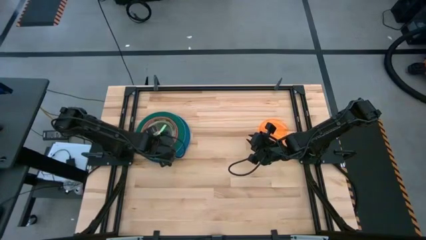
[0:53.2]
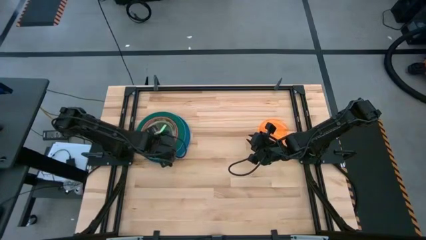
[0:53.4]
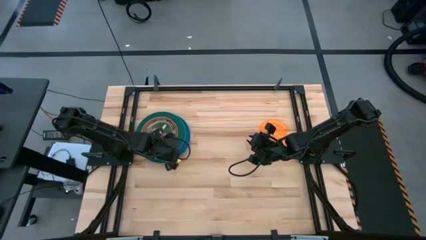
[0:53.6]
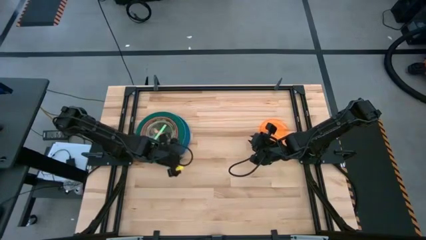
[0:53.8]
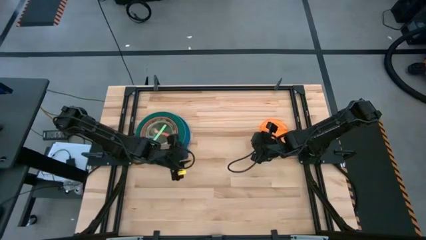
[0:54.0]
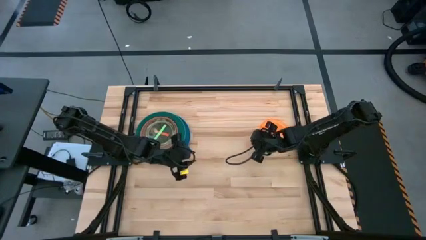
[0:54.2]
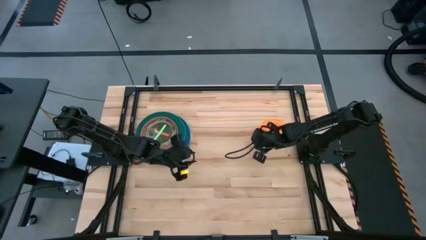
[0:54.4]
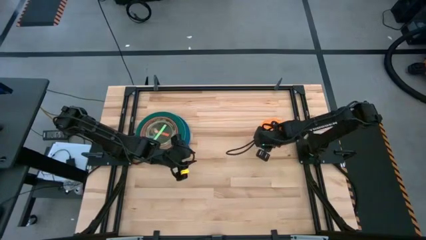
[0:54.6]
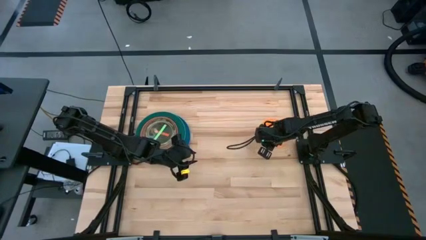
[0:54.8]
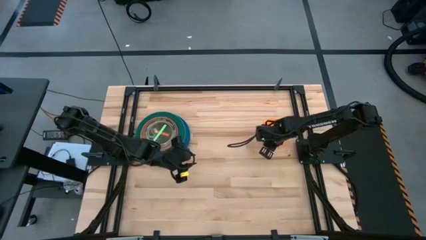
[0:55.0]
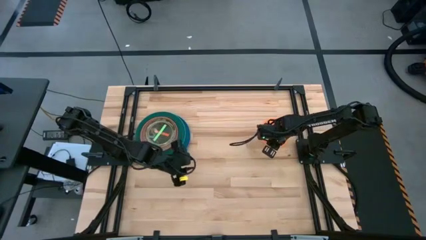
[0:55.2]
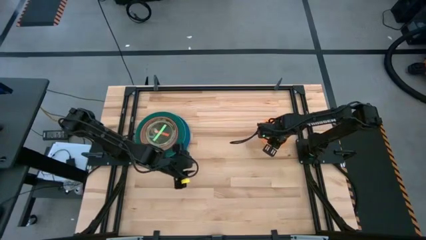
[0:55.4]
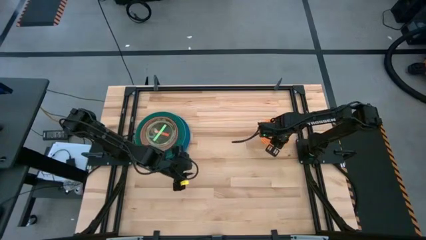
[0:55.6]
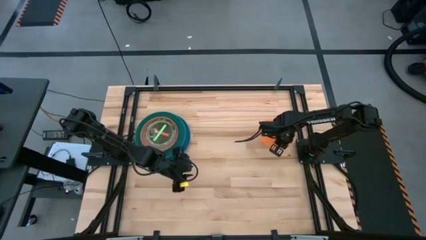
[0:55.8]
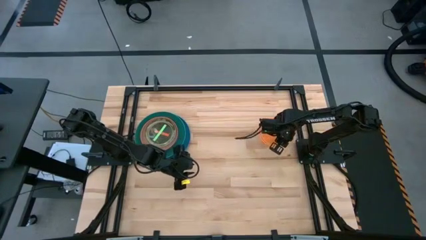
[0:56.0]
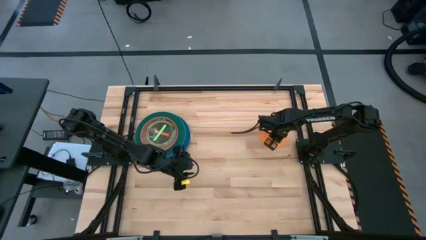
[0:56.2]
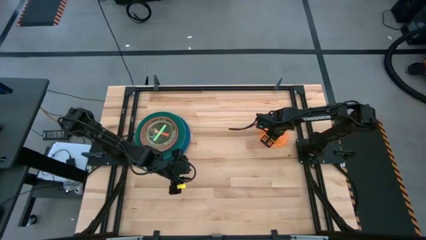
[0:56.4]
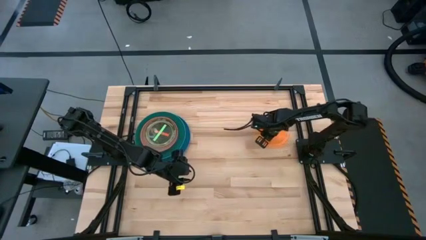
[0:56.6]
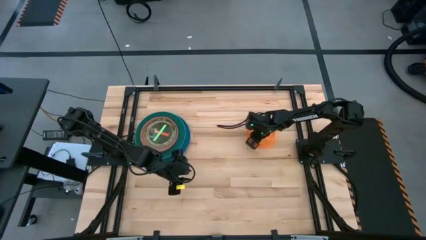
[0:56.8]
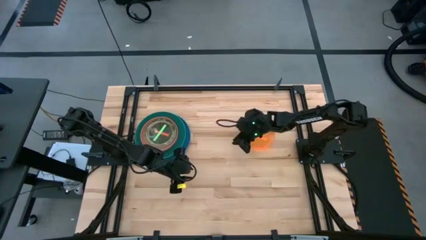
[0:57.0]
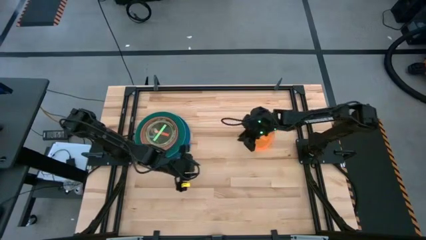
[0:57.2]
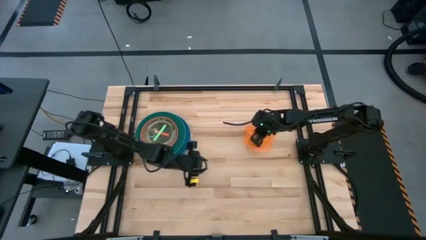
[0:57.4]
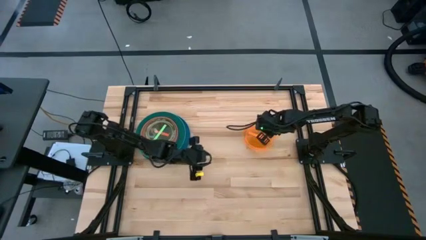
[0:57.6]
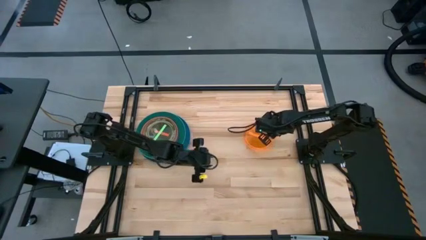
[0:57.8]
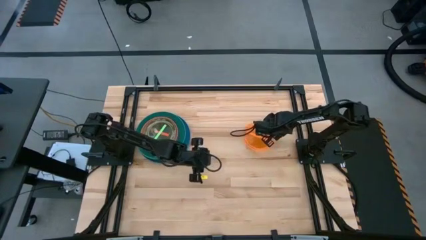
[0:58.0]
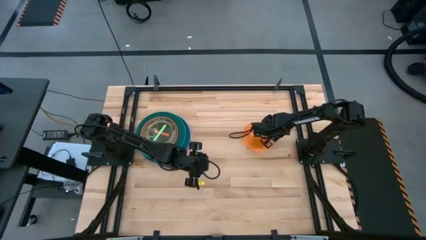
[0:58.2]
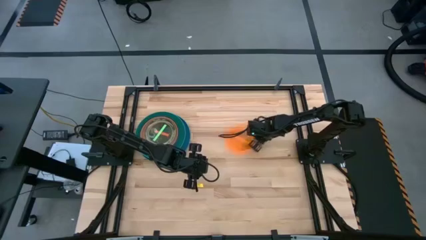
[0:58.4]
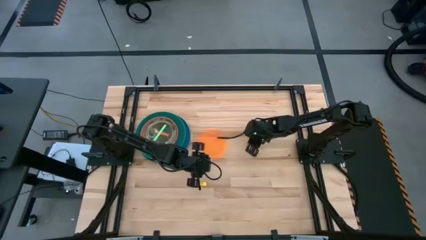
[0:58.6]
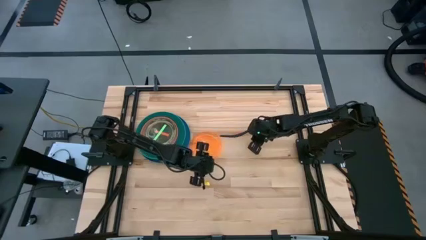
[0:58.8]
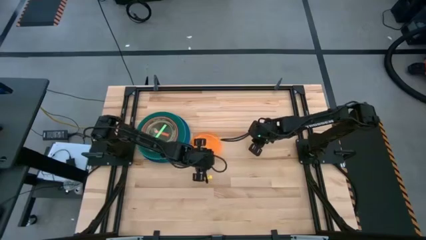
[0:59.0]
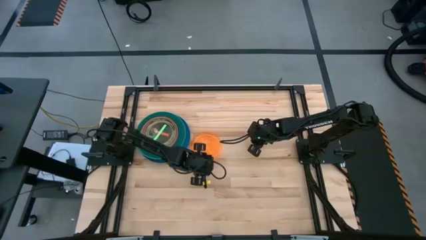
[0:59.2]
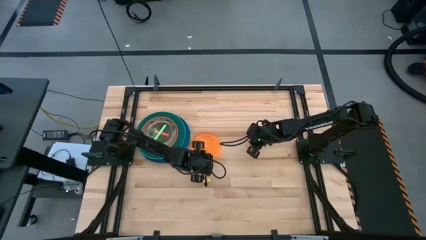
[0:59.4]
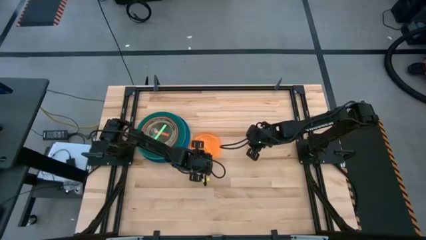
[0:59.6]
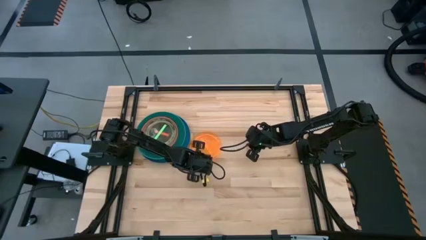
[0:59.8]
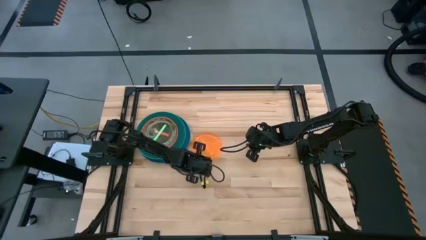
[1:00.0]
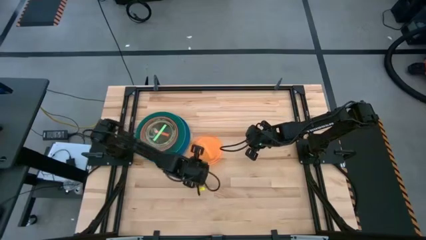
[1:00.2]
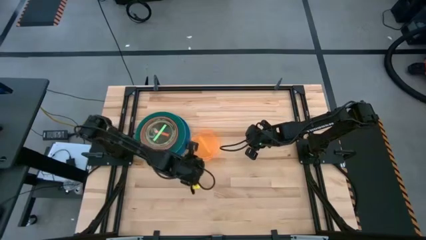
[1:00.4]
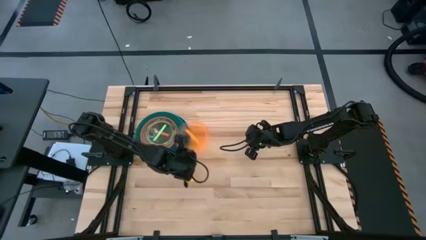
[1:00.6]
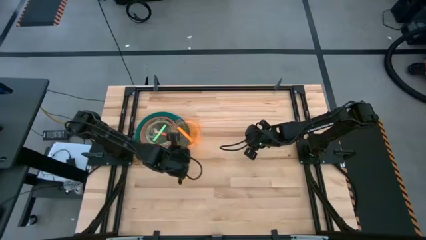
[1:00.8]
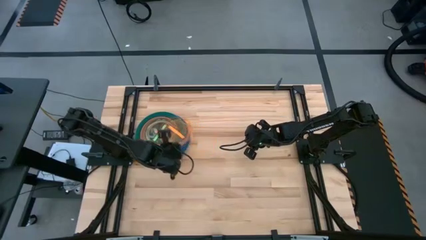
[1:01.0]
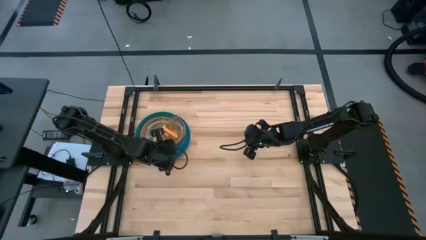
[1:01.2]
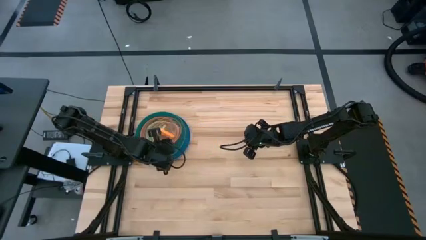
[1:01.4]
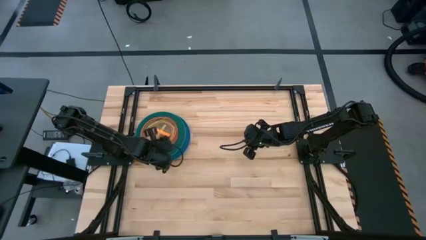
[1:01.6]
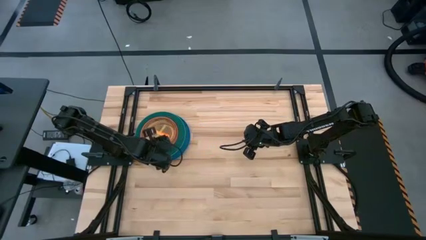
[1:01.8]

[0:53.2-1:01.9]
Task: Stack plastic plates
Stack the orange plate on top of the light green plate

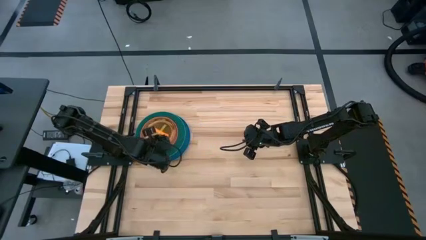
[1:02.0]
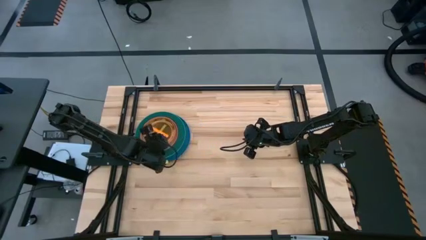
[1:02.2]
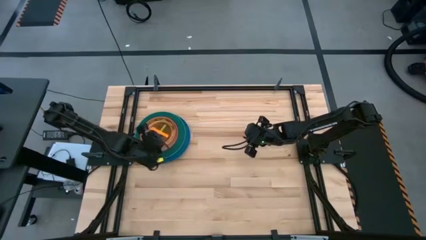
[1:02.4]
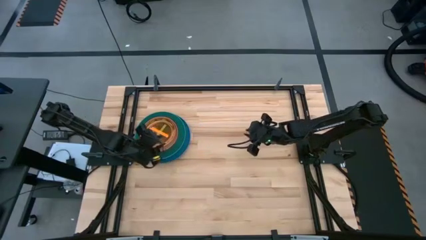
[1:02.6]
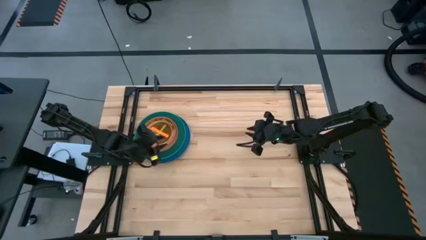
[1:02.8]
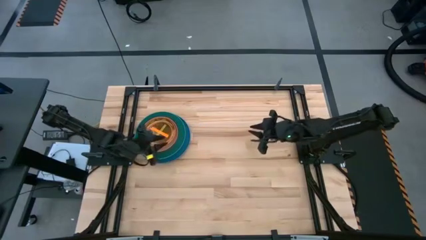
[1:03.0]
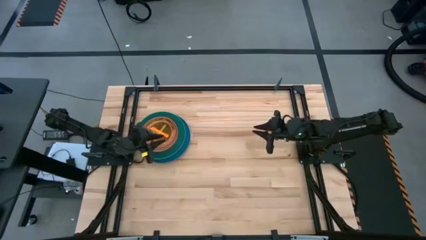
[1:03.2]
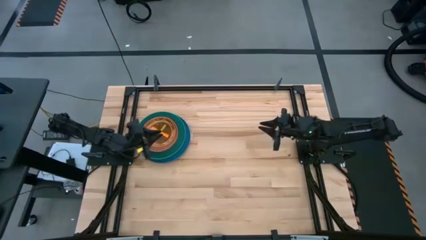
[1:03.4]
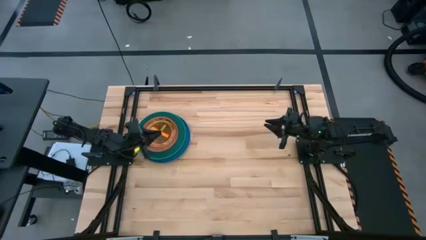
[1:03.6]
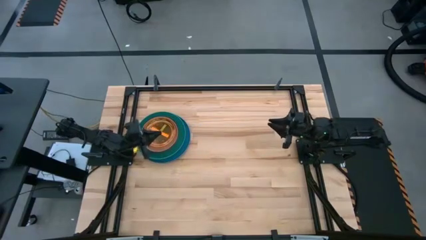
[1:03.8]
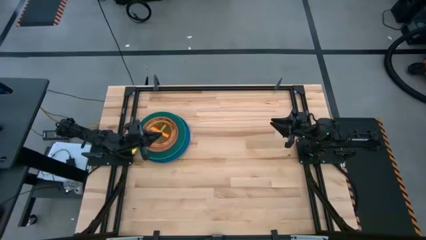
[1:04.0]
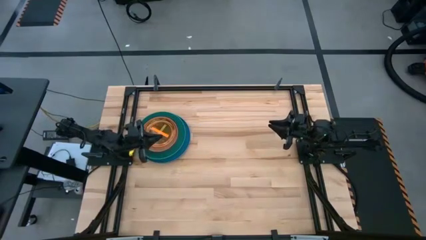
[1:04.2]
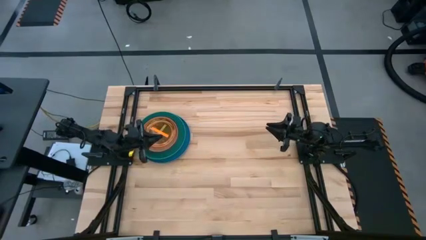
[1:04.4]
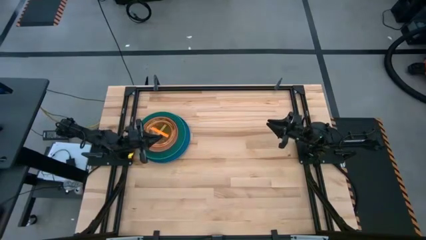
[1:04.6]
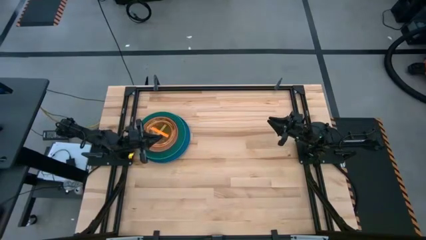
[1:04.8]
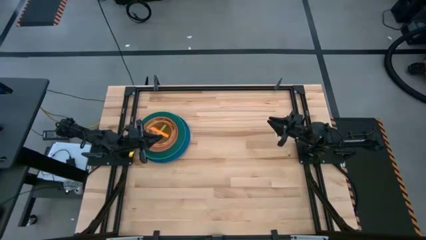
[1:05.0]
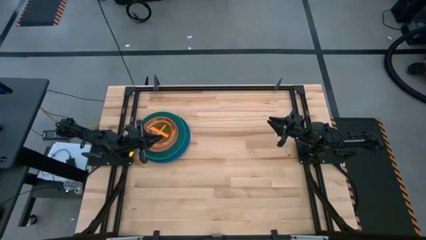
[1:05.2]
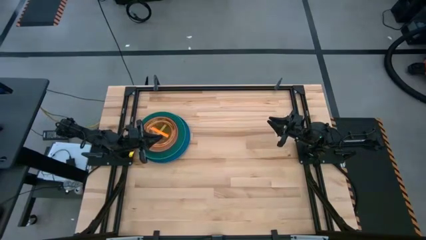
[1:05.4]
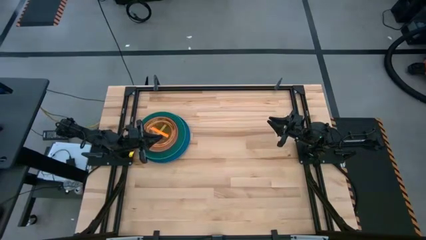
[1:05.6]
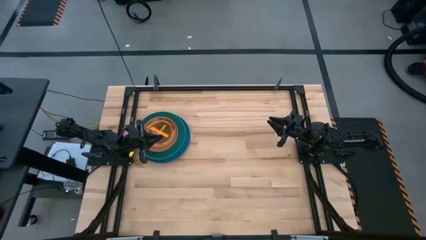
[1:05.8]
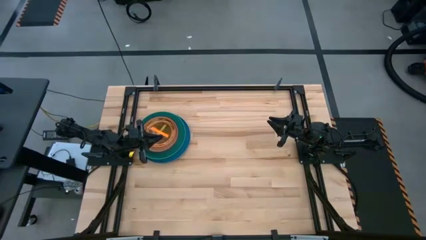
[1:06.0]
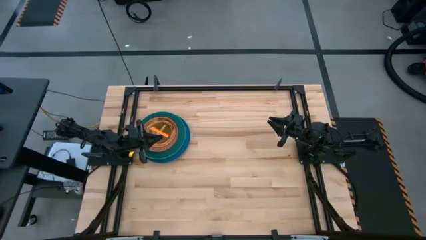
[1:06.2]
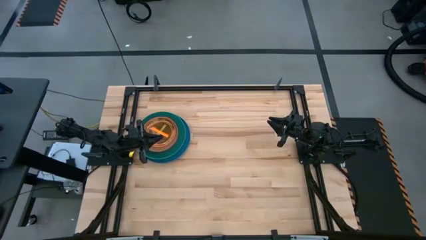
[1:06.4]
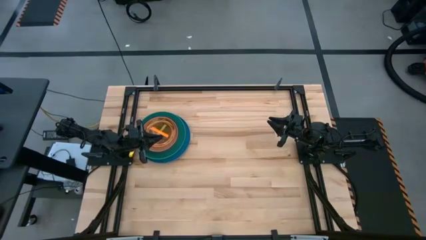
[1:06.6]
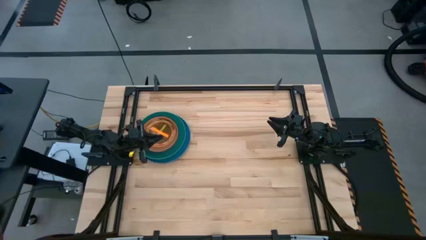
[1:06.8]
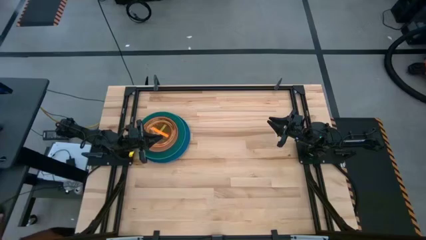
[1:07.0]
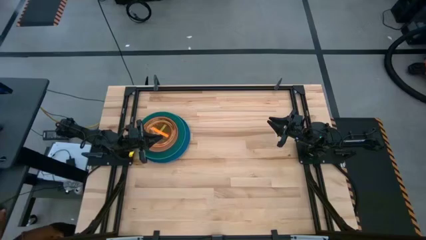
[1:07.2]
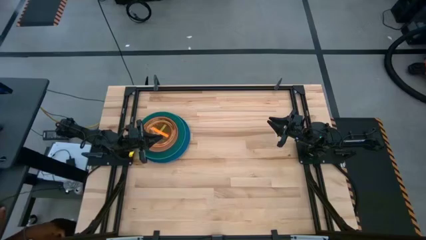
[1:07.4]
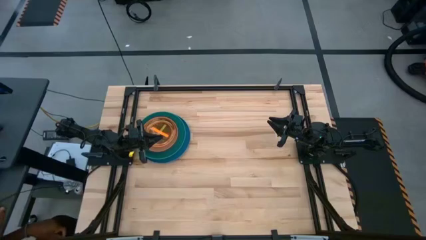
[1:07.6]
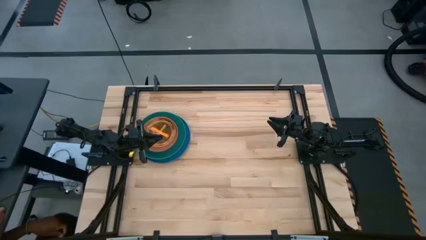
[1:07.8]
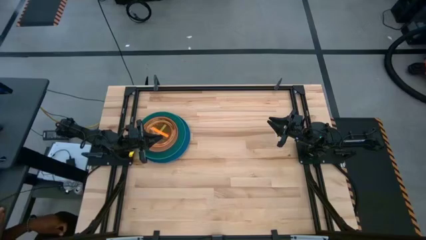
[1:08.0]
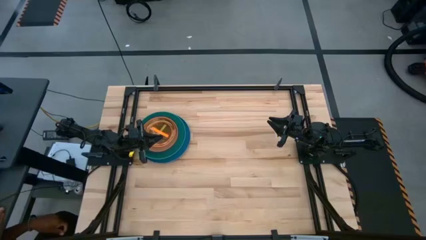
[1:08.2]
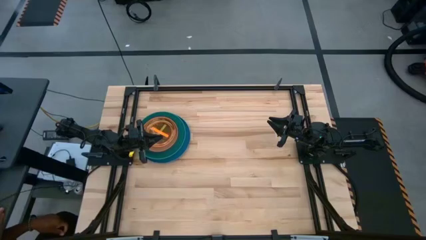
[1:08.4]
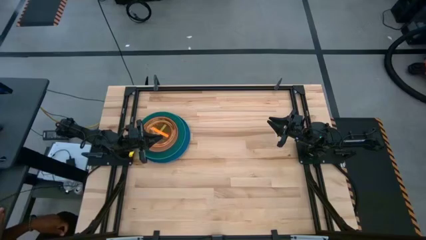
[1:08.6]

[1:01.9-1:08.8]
Return to Home Position

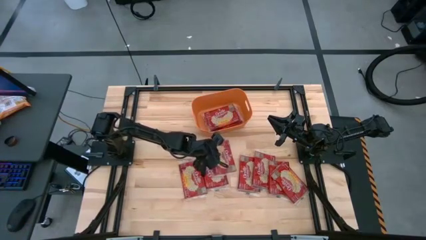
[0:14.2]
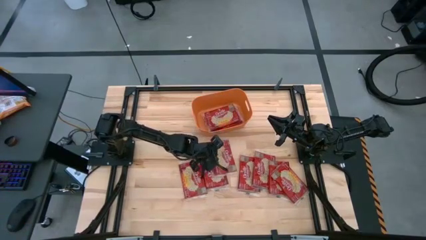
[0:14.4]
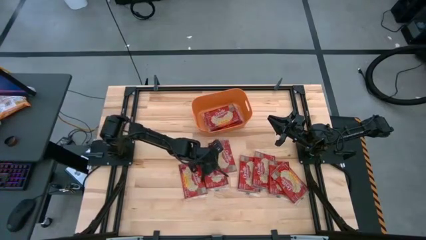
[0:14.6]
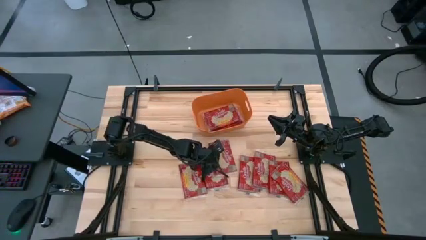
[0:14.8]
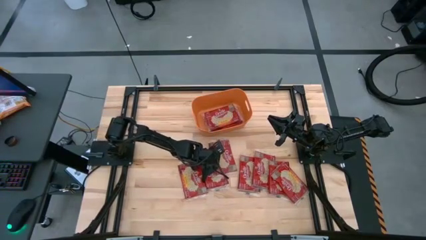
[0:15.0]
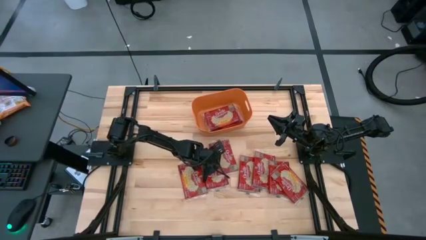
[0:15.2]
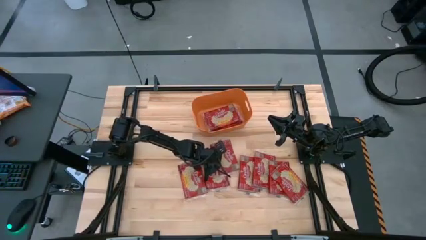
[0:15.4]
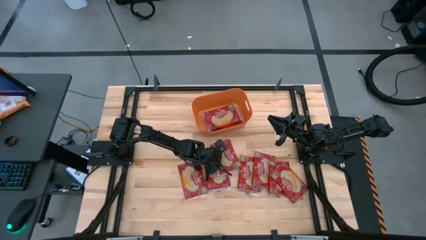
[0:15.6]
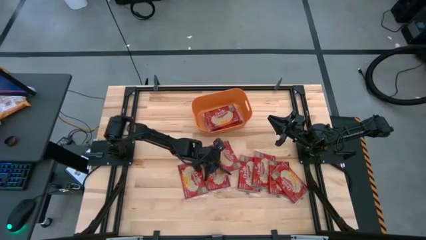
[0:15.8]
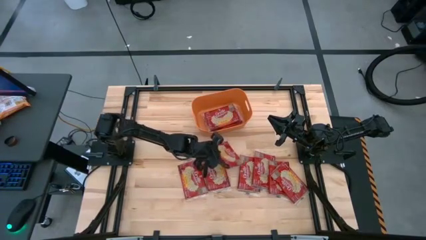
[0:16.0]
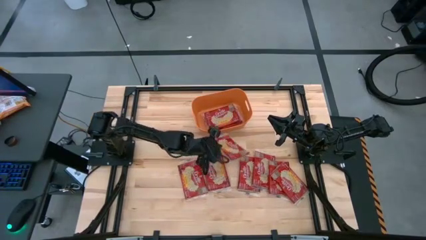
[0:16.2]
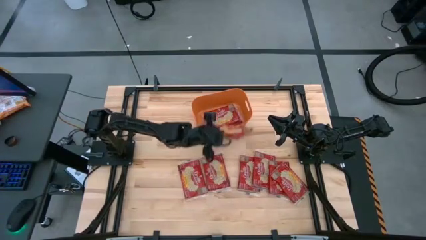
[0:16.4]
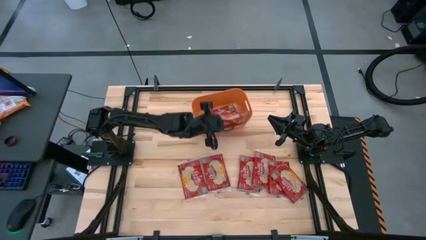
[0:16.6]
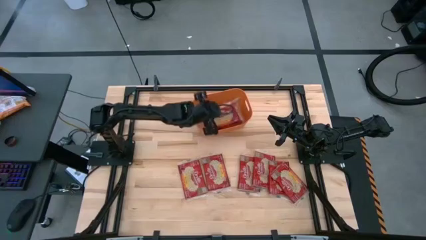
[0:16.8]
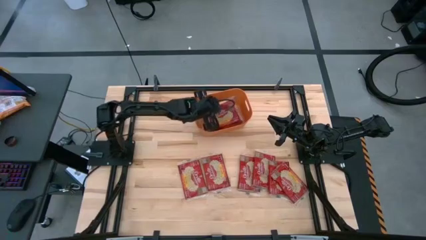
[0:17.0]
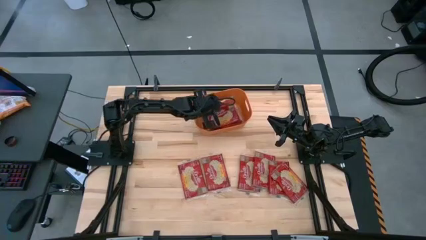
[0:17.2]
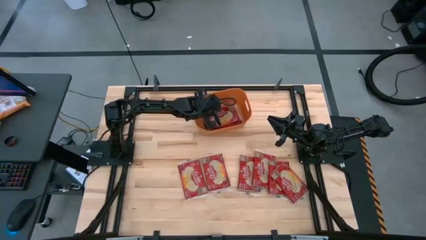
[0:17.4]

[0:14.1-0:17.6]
Task: Sort popcorn bags into baskets
Put the red popcorn bag into the orange bin
